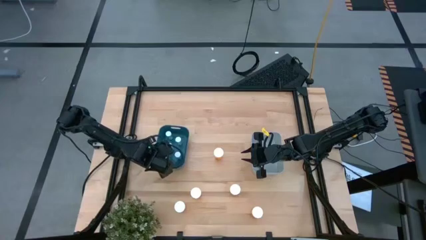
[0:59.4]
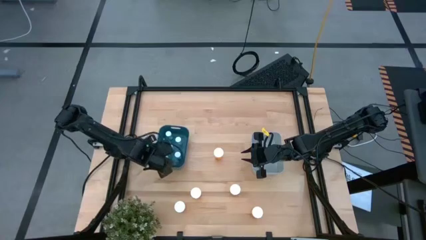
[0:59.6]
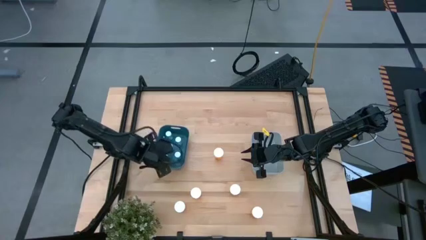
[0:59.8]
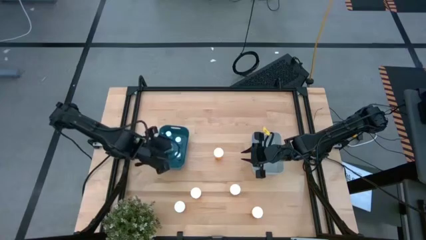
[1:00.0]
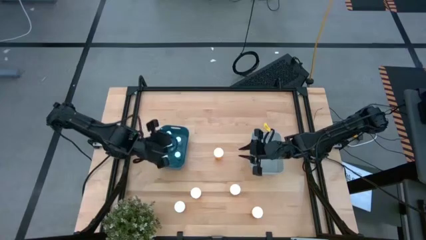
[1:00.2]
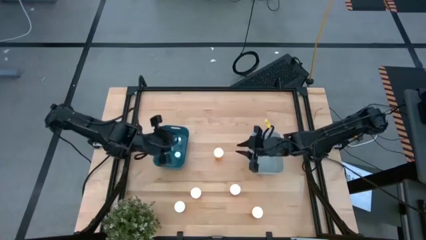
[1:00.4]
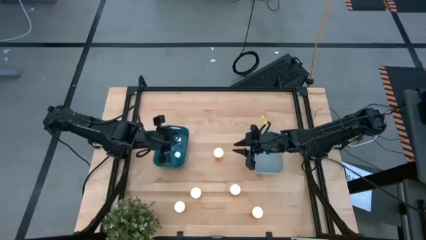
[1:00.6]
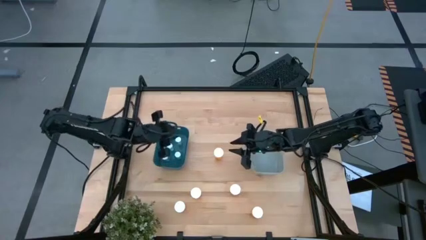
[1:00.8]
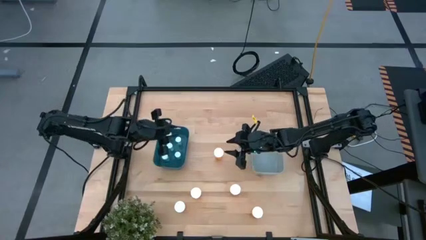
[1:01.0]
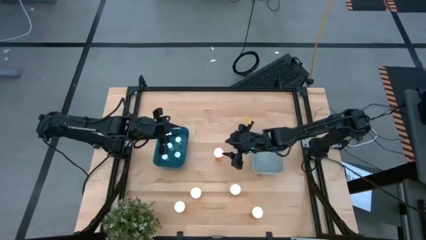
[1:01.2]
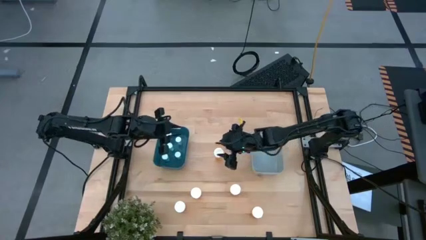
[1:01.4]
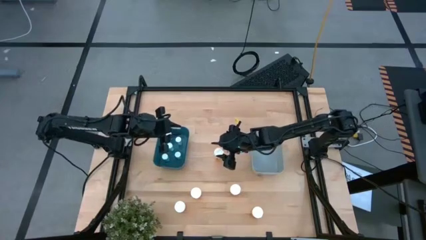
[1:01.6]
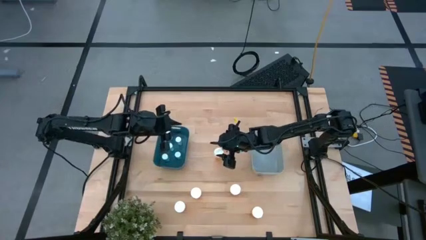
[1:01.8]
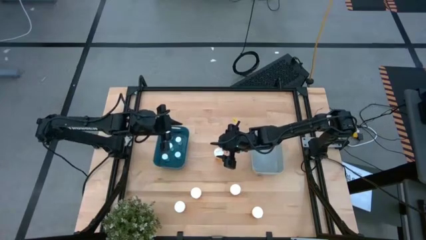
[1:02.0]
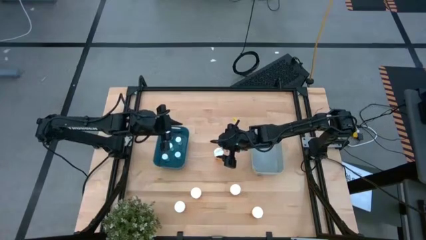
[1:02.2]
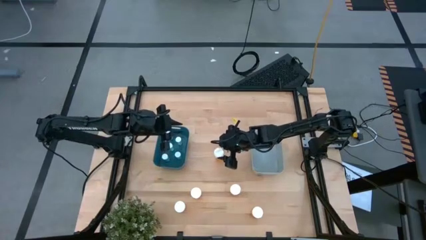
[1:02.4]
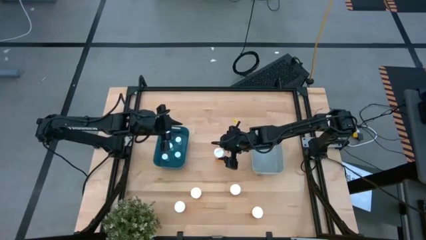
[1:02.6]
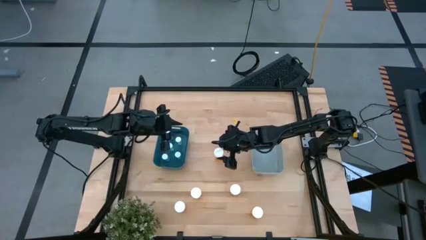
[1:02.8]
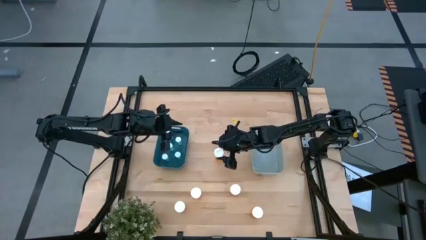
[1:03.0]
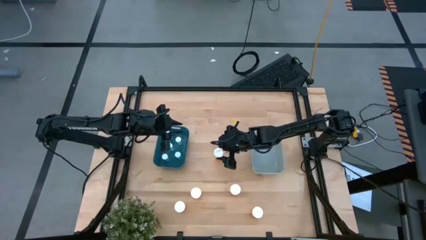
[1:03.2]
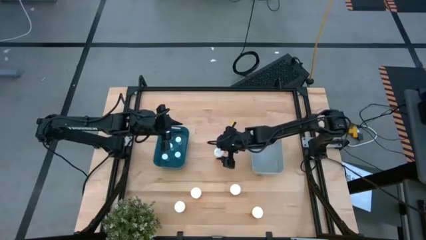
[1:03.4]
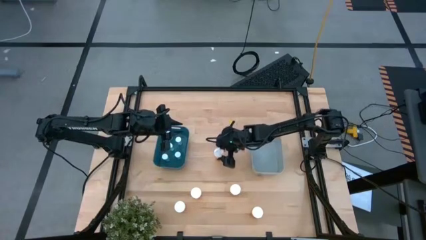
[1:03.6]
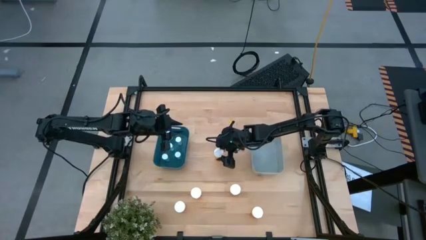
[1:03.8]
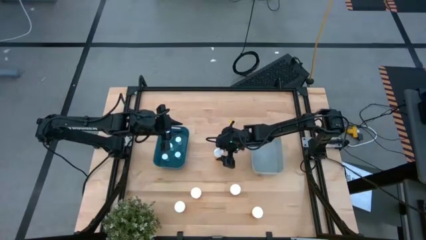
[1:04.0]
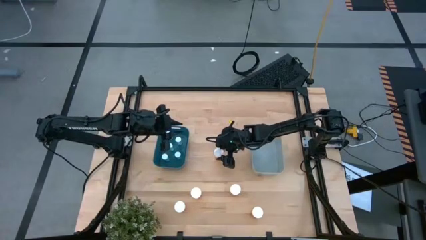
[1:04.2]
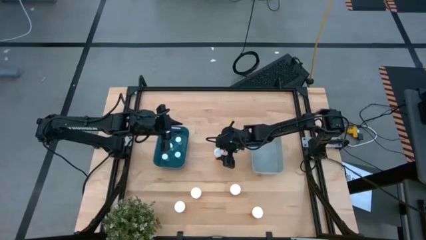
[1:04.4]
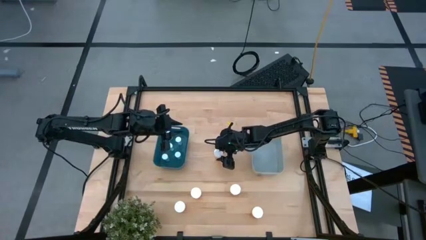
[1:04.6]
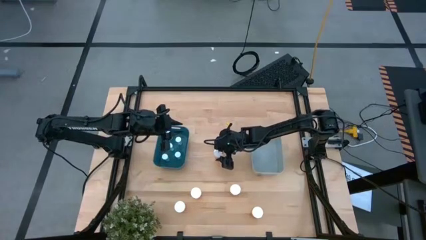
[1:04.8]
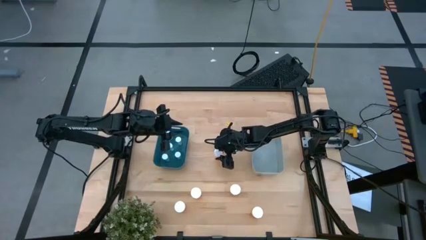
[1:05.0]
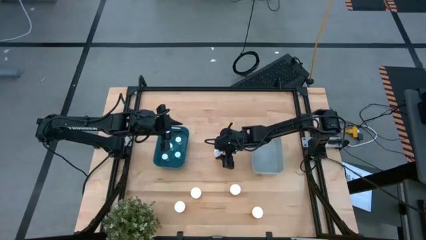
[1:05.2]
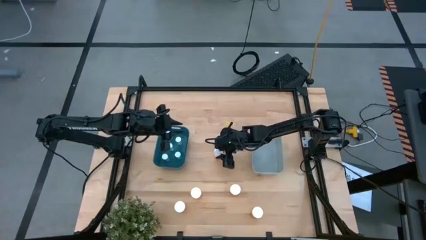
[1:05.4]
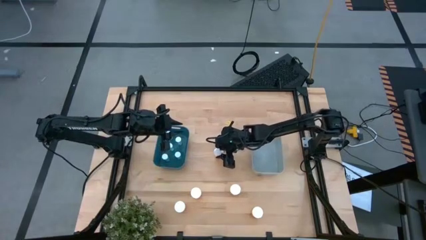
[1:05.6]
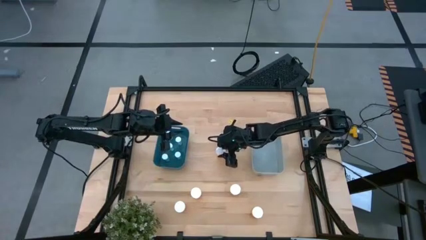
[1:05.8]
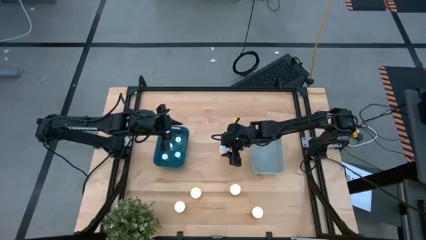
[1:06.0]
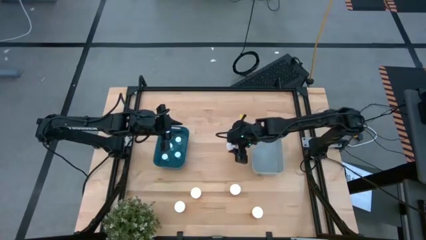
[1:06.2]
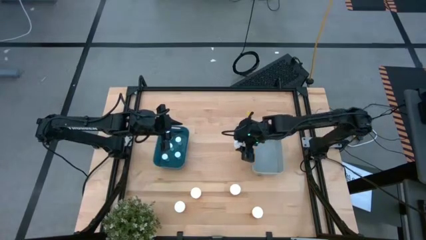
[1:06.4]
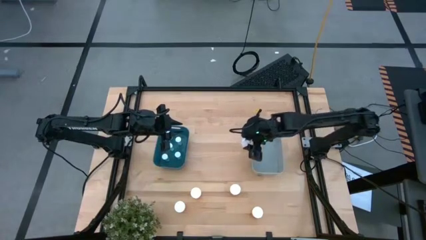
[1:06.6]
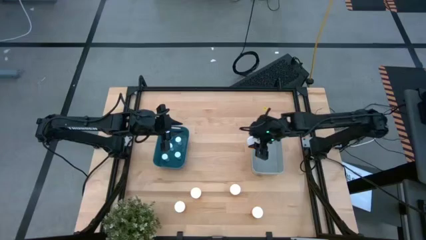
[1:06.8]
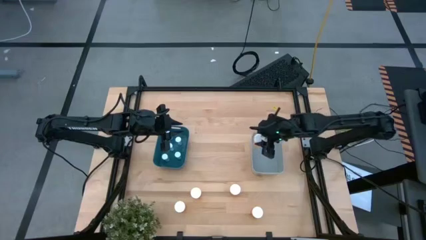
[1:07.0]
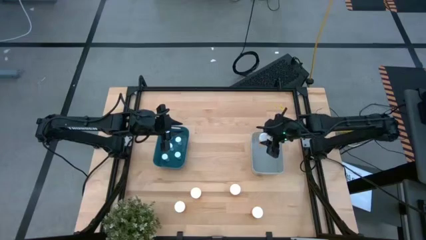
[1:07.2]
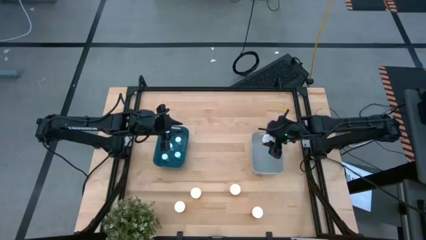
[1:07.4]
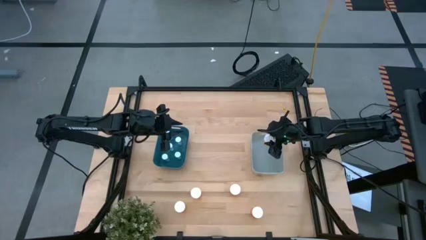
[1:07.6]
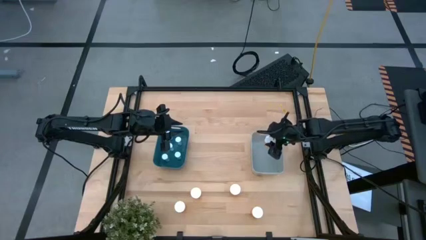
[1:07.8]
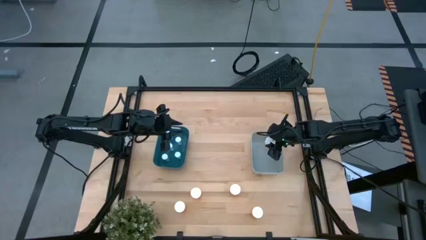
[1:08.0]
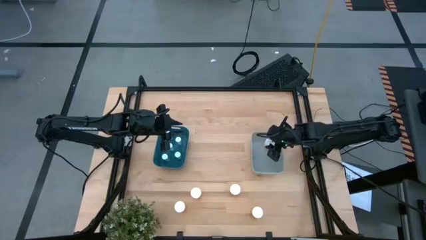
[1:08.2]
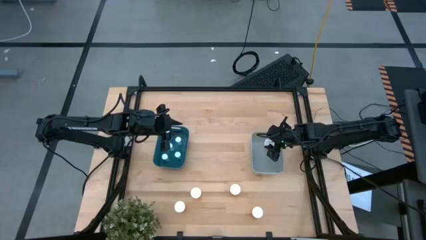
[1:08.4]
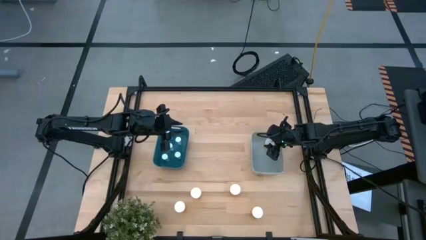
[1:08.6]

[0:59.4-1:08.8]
Task: Pick and place medicine bottles into bin by pill shape (circle, oval)
Put the orange pill bottle into the gray bin

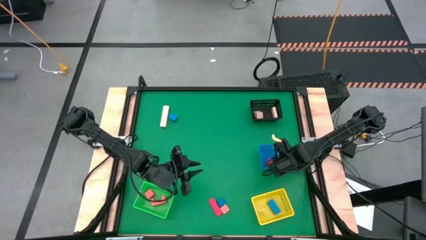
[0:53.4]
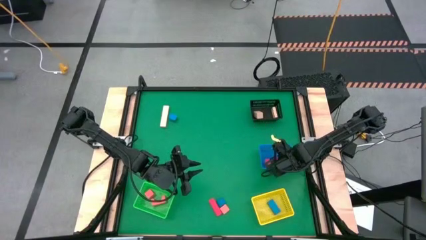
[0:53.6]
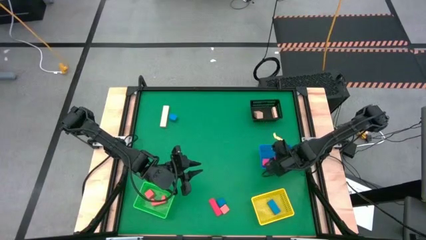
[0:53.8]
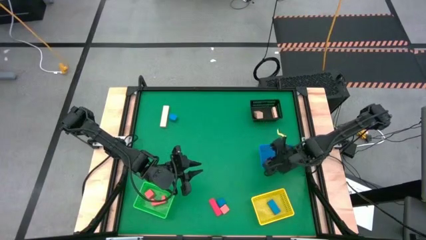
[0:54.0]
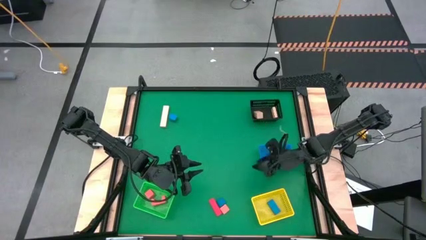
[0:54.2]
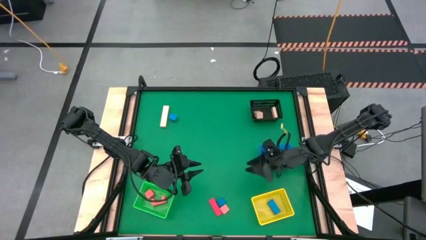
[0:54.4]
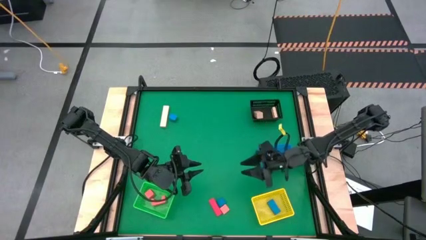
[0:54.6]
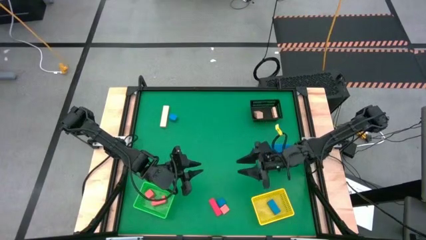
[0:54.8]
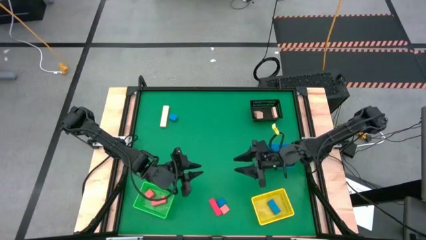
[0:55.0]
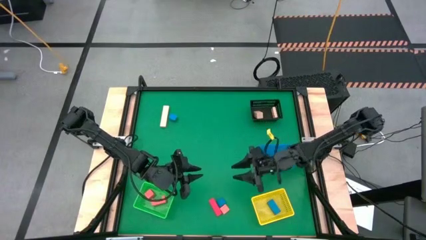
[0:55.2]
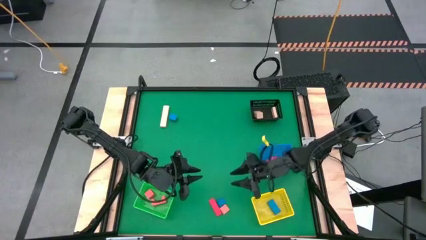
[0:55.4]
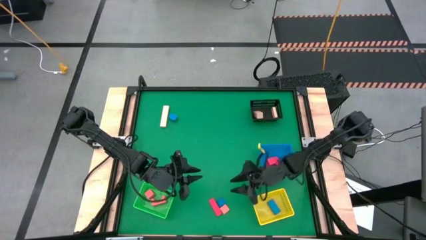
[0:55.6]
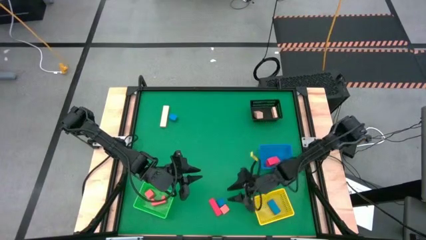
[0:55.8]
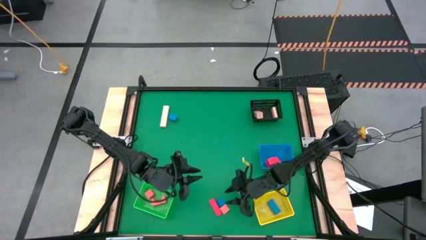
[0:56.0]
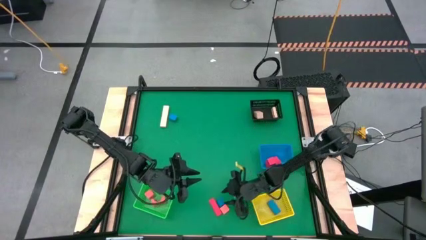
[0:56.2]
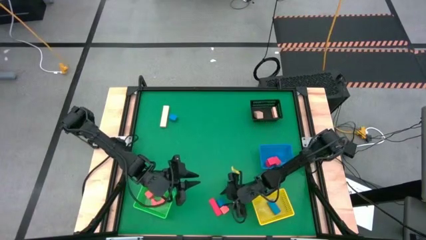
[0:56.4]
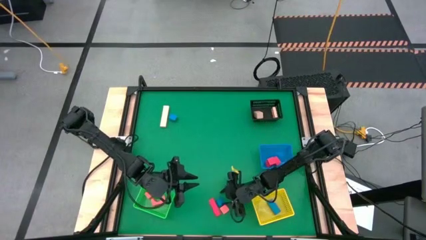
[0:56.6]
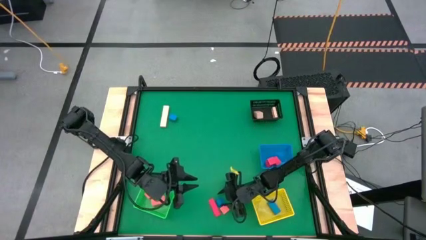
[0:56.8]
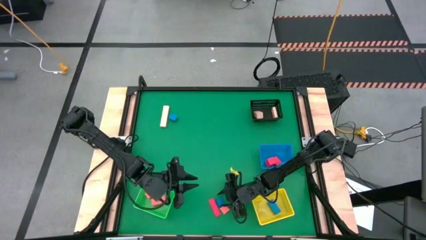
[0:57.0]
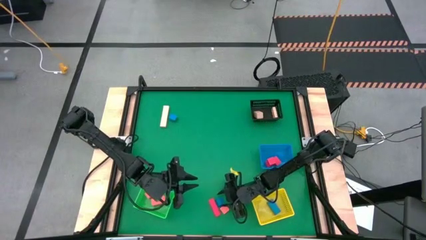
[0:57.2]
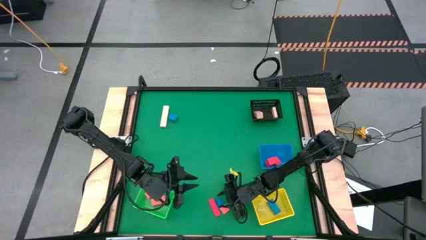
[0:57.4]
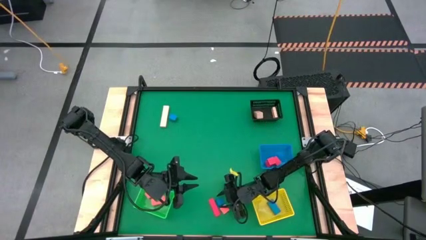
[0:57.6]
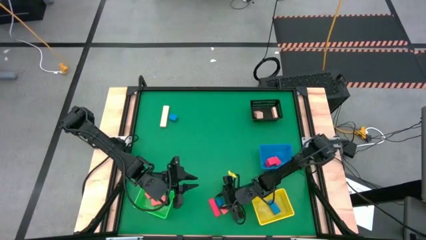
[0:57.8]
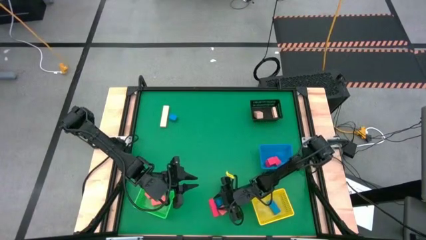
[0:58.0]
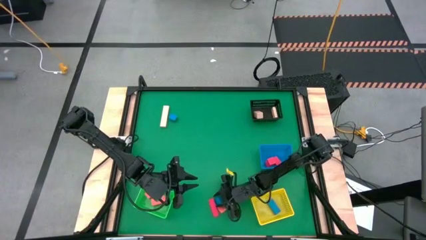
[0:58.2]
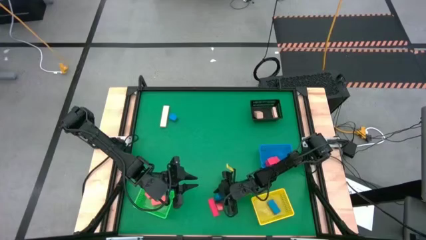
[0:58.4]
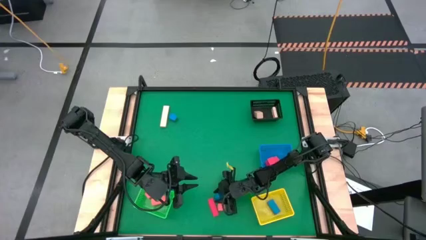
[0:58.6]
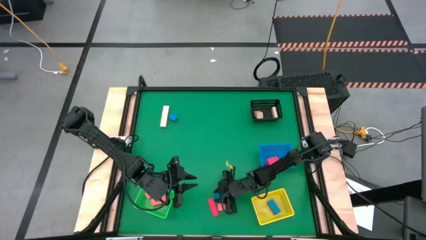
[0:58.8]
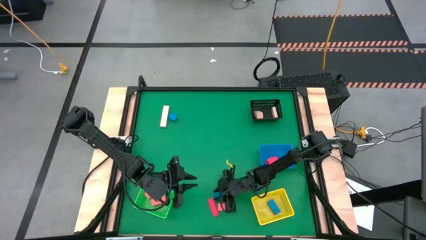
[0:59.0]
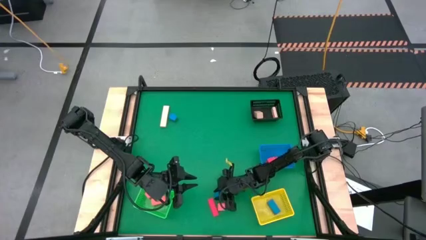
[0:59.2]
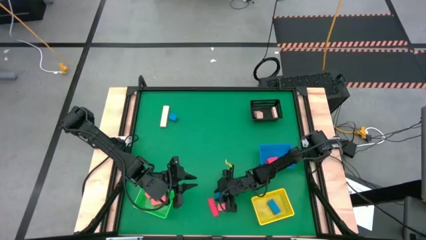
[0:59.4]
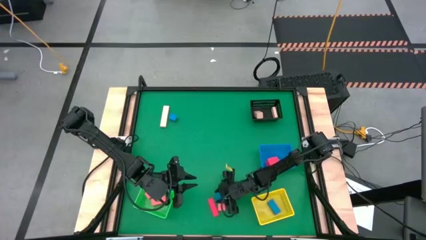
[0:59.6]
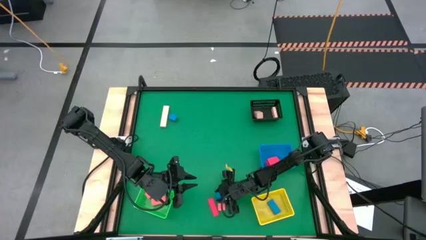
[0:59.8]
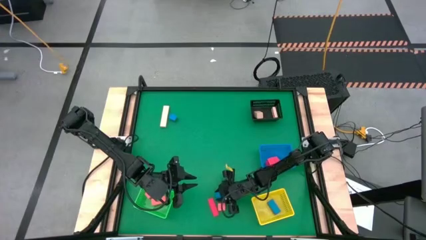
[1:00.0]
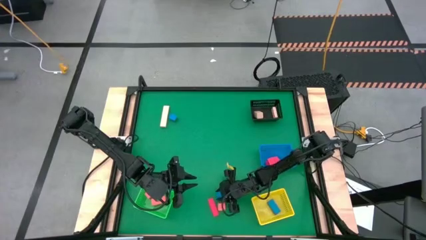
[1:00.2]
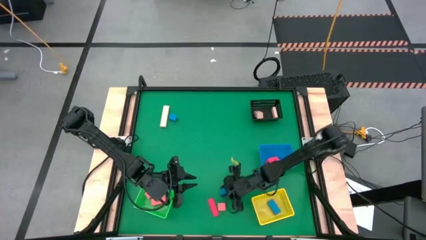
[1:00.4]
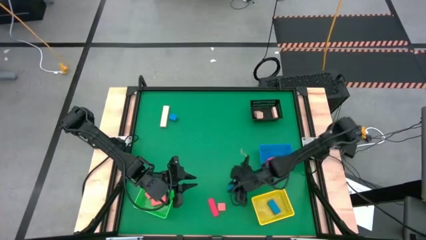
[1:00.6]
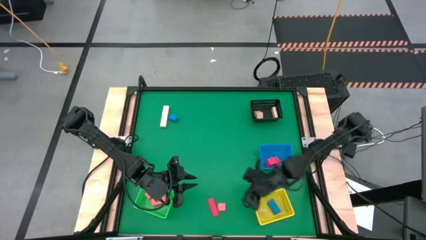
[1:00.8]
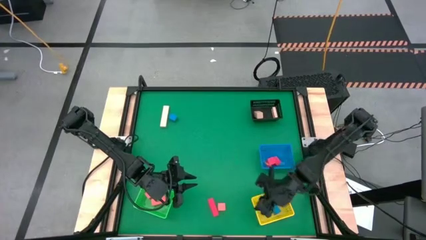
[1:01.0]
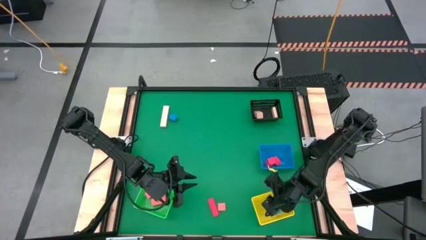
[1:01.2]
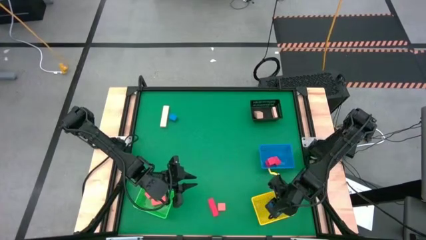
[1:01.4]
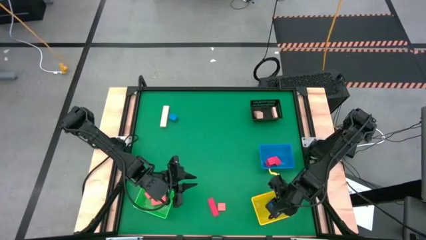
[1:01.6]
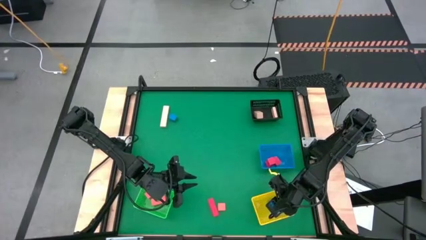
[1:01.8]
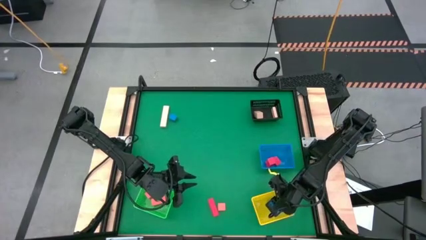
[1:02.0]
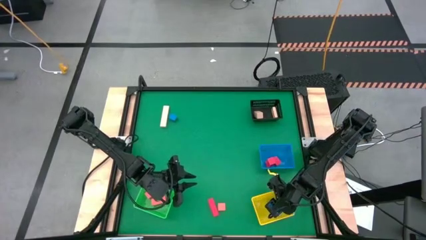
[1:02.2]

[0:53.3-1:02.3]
Task: Sort & place blocks by color
Put the blue block into the yellow bin
